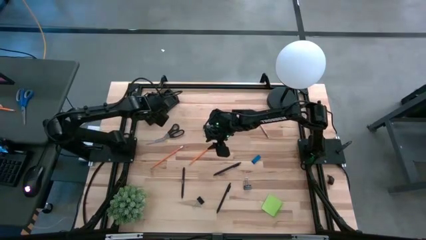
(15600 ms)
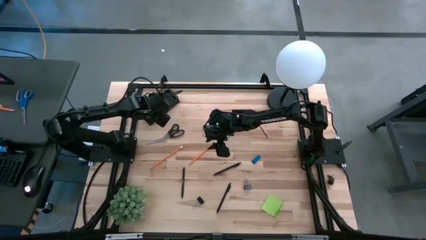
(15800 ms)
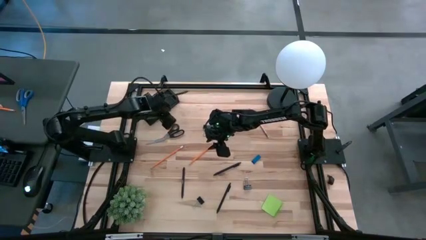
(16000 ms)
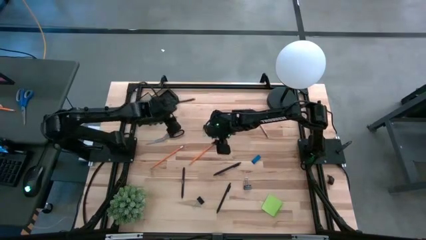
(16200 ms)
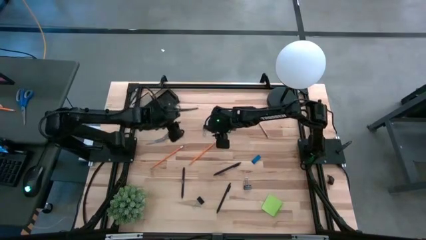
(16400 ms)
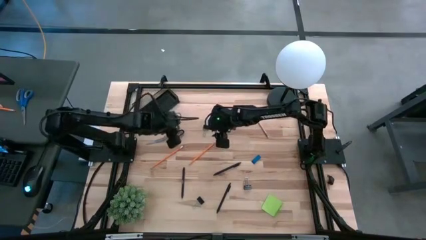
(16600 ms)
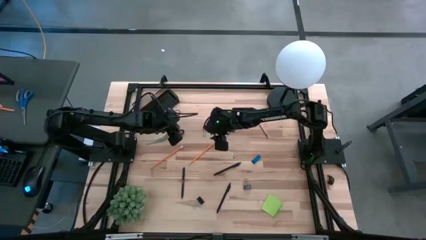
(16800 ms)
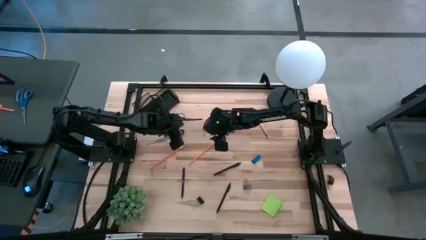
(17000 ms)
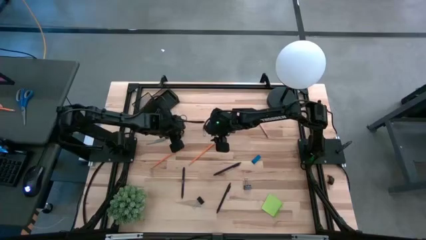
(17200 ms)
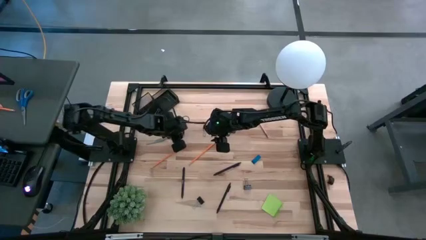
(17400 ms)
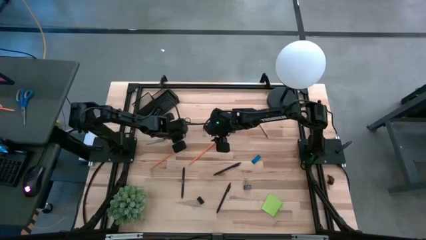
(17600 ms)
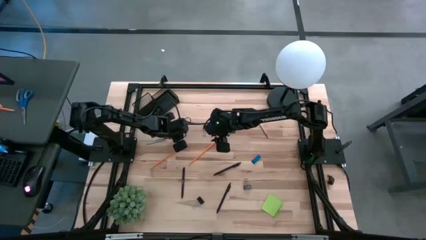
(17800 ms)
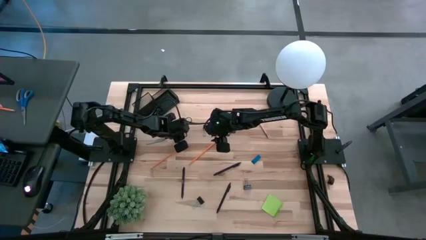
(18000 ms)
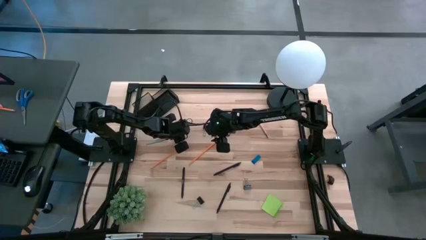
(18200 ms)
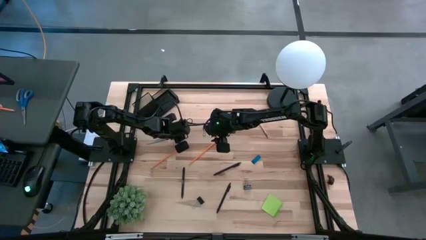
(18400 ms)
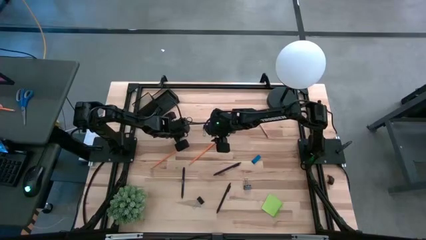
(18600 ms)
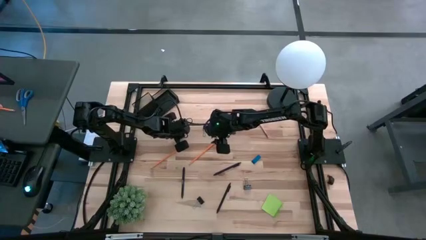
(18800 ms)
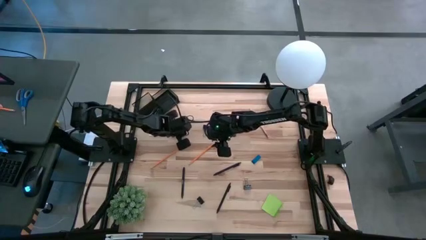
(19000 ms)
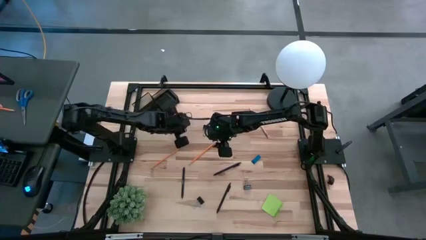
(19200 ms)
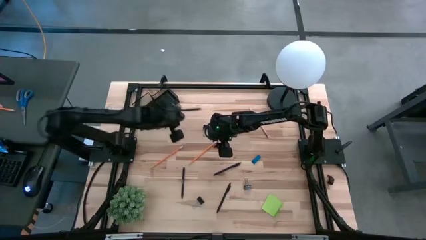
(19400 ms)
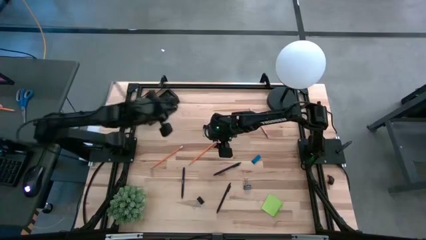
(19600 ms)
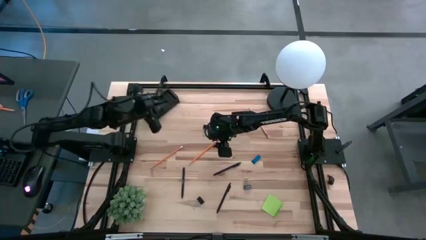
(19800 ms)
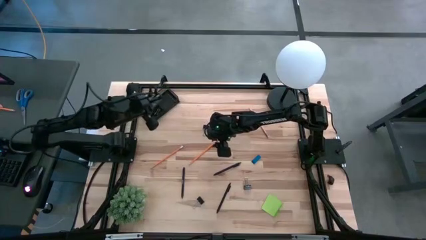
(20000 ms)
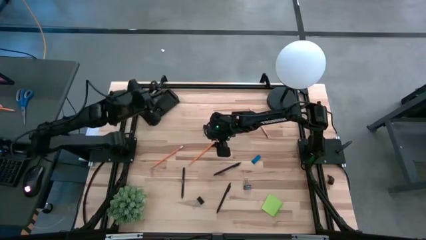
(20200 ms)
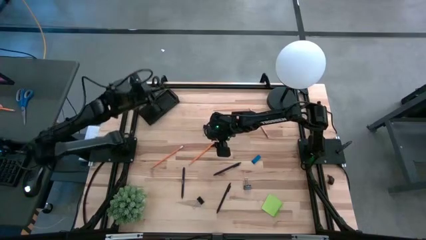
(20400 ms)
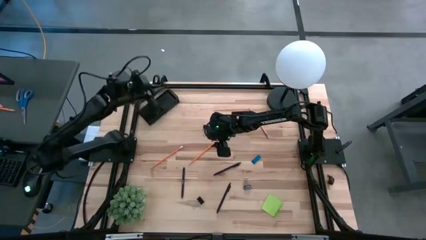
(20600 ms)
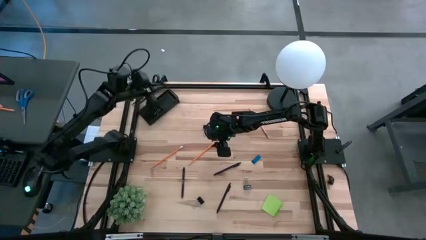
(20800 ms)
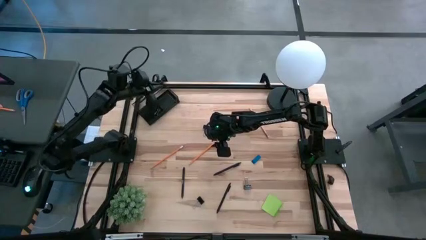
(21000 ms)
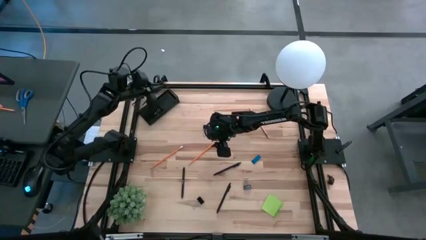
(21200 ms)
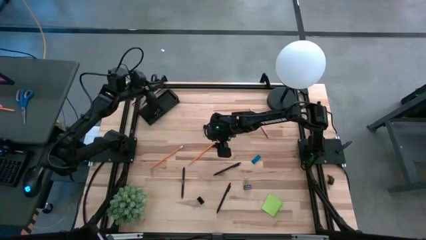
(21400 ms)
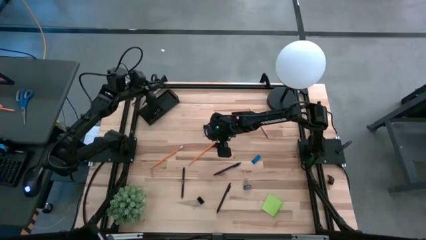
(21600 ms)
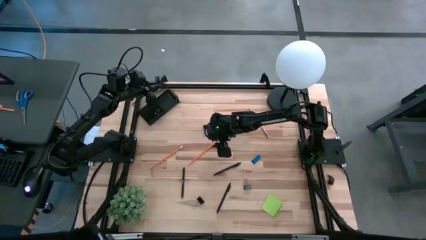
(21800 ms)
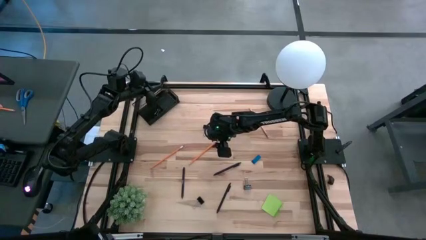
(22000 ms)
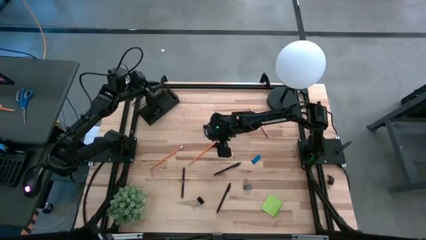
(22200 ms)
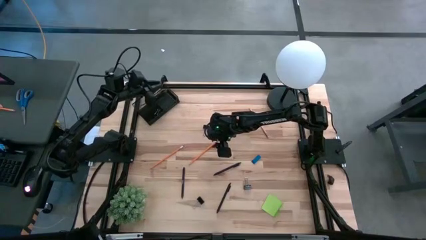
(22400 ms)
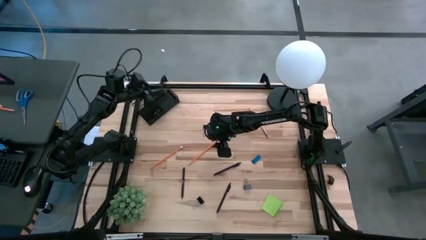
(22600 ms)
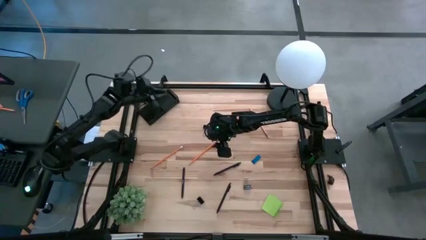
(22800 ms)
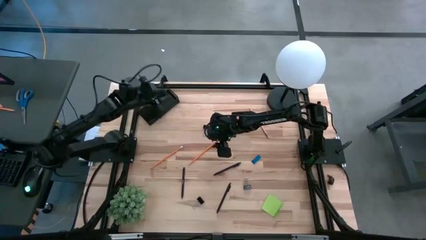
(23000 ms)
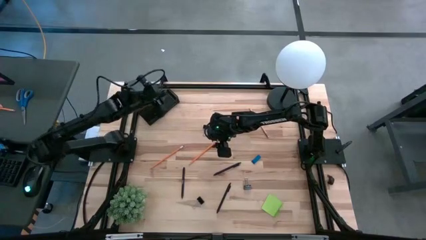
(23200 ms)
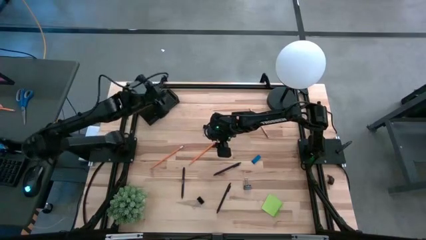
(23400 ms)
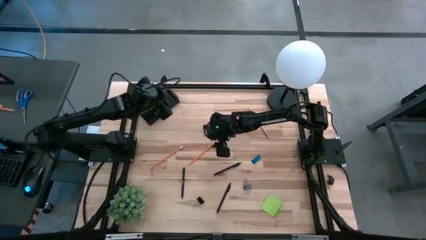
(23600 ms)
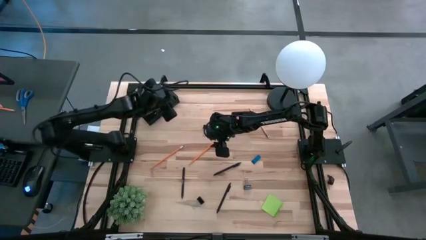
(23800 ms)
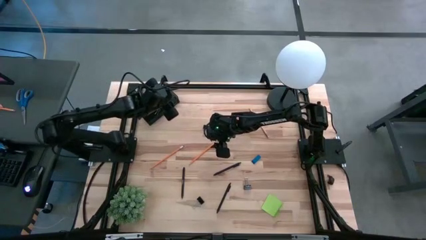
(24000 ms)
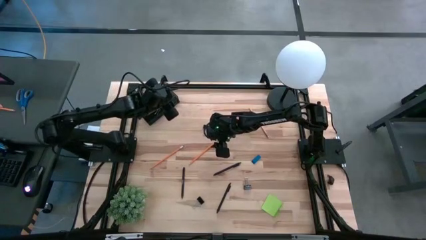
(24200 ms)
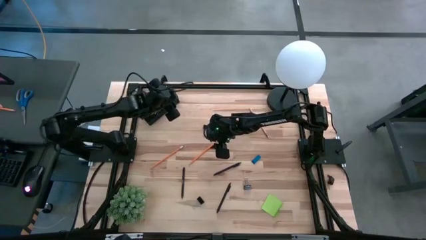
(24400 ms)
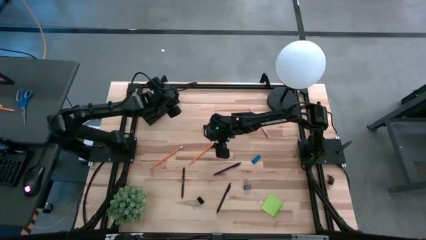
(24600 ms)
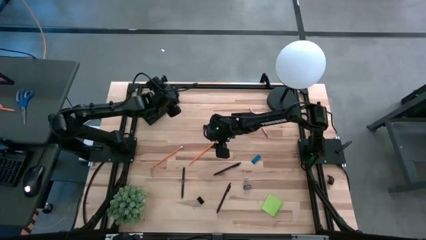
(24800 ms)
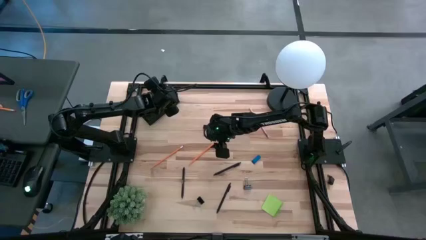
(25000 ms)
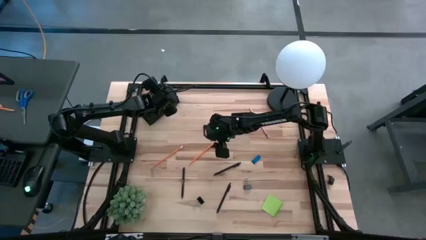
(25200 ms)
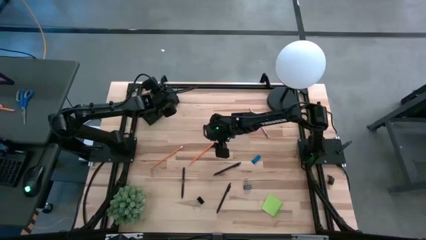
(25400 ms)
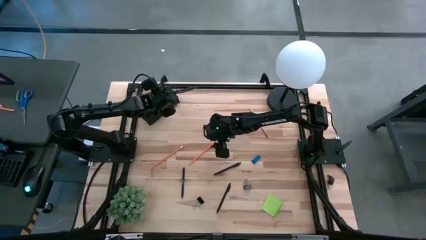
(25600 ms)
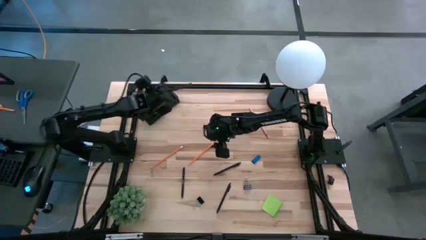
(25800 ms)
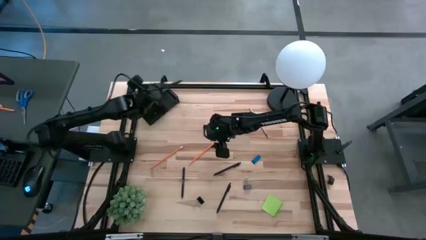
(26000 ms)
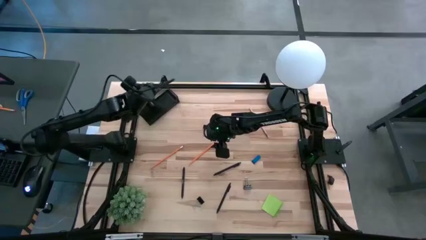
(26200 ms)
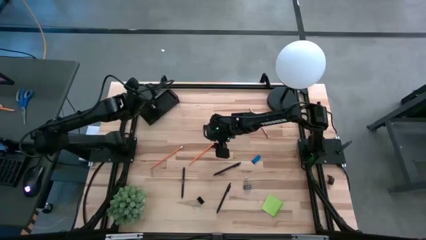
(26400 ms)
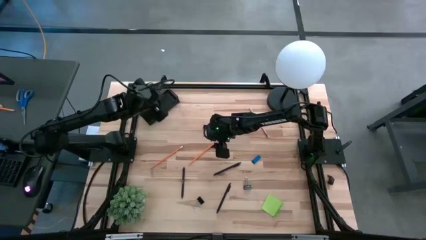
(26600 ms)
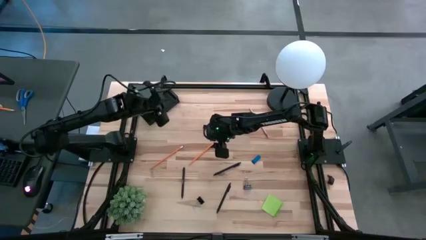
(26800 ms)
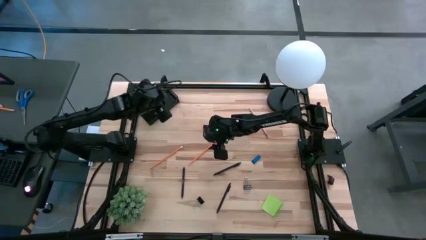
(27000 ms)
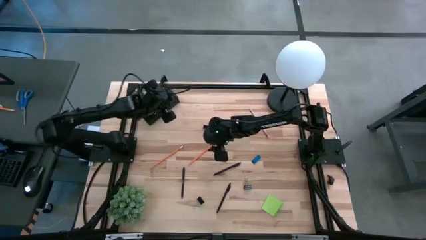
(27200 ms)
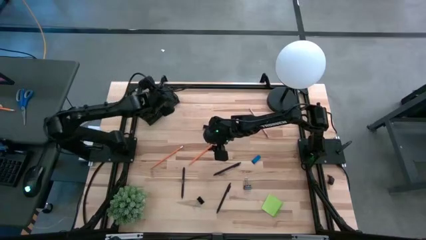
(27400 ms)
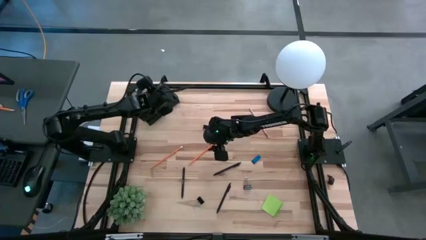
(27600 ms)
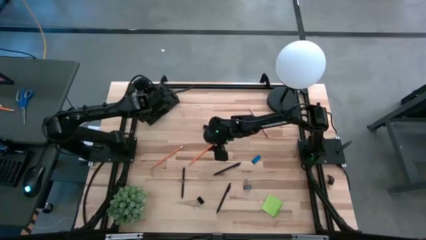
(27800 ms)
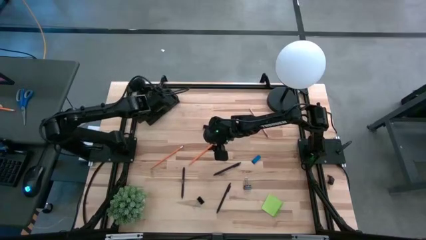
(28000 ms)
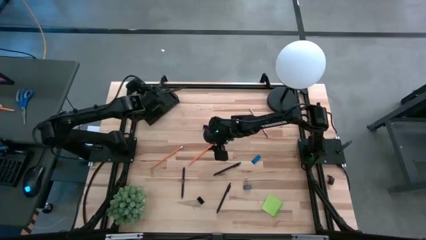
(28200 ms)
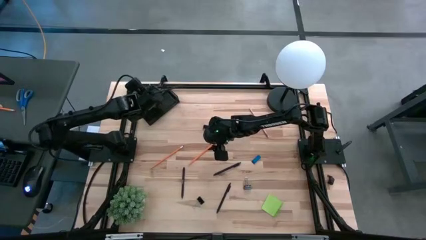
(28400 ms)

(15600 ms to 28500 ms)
Task: Pick and place office supplies into organizer
Put the black scissors into the black desk organizer
